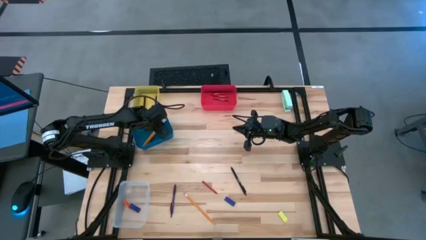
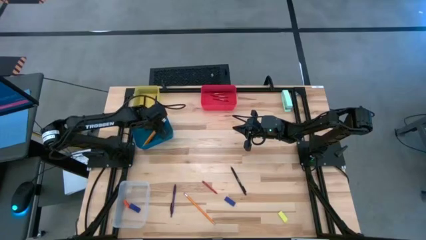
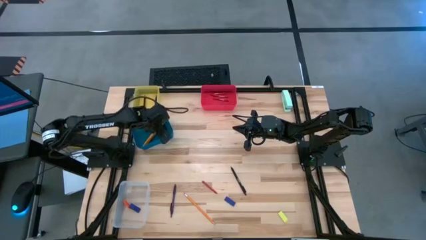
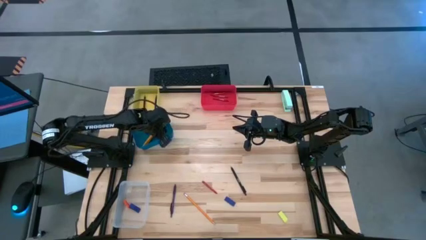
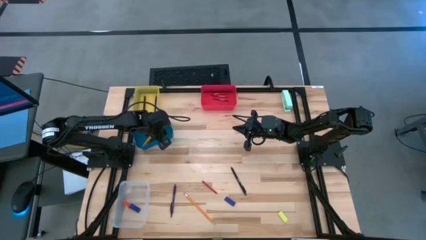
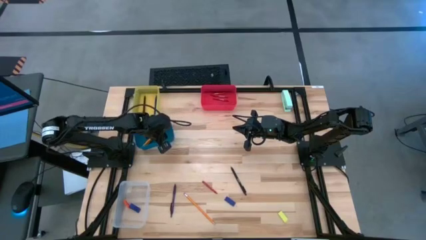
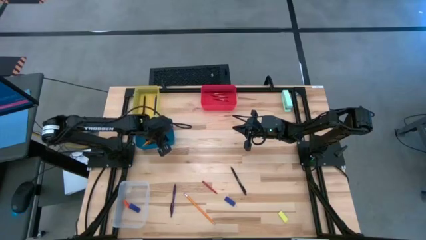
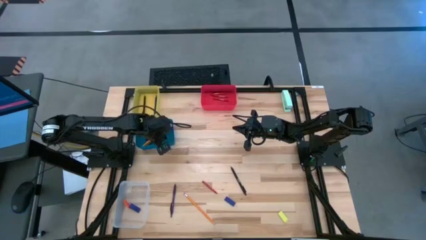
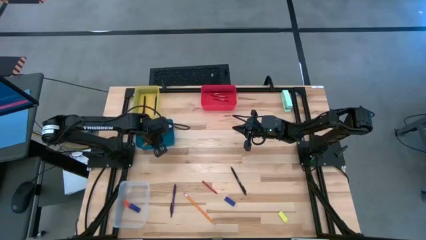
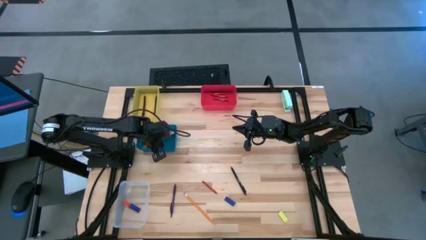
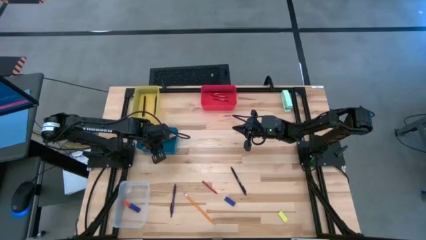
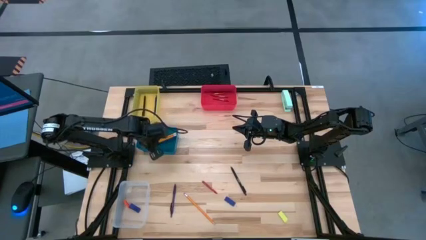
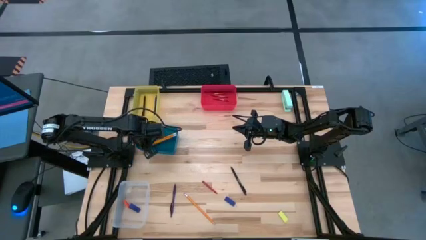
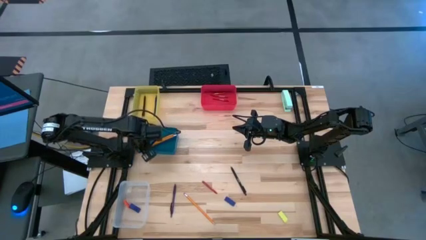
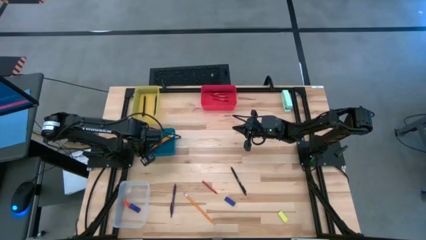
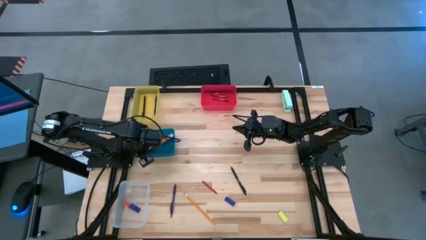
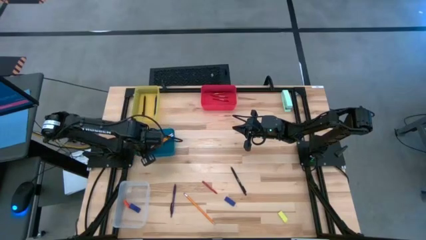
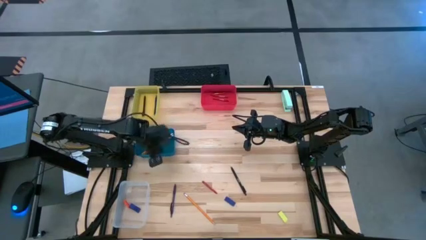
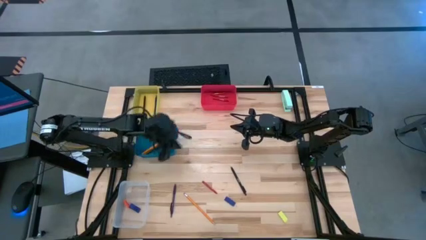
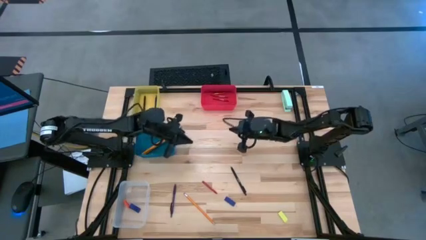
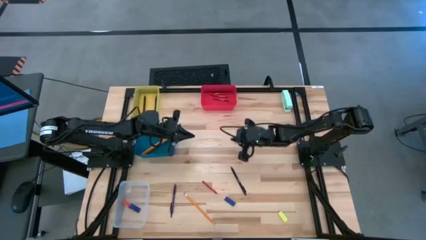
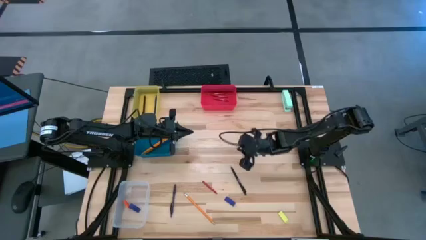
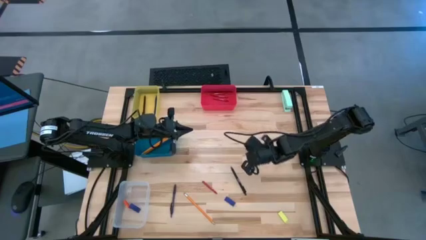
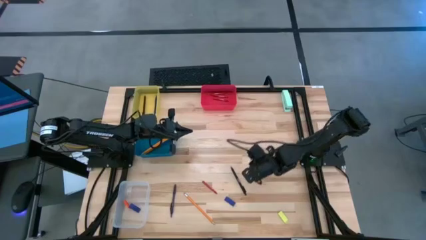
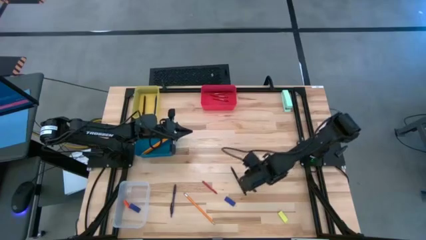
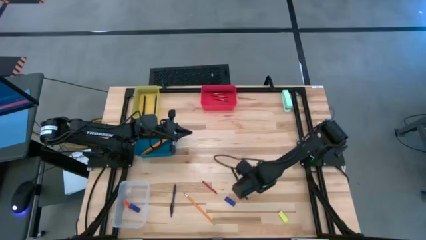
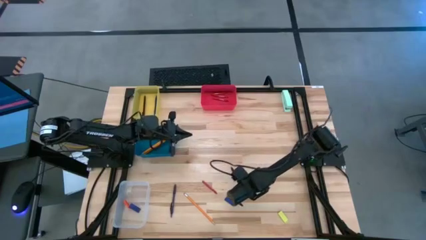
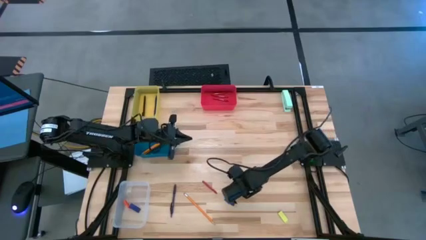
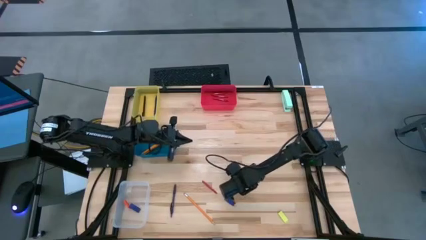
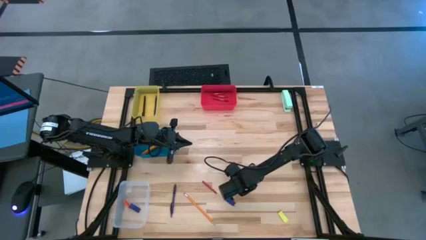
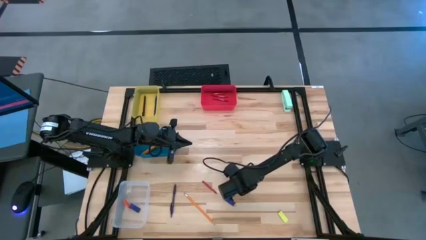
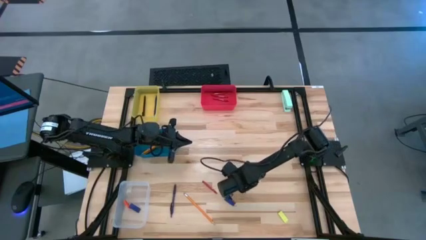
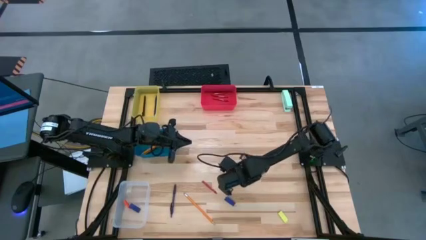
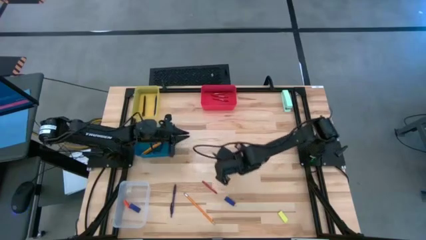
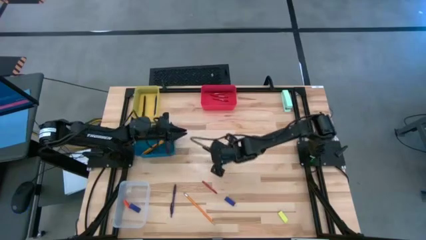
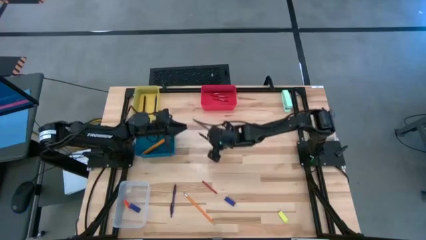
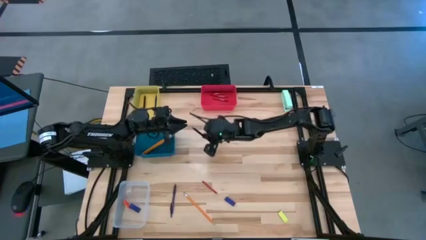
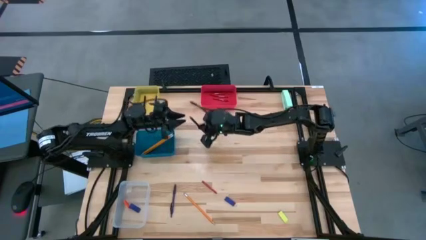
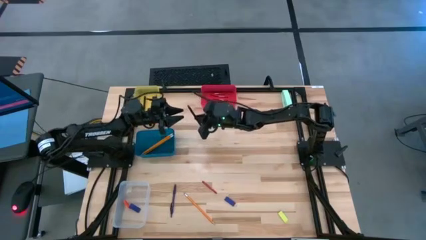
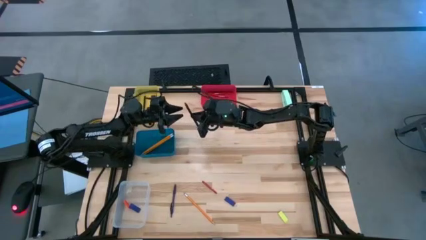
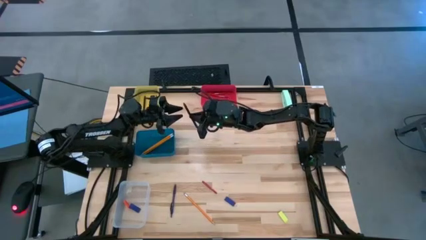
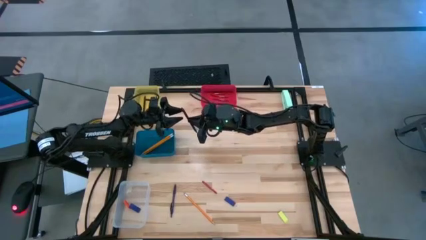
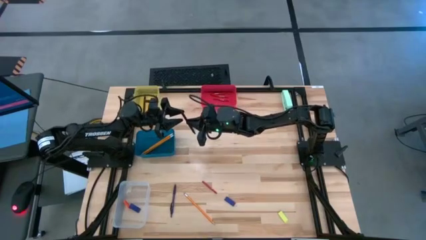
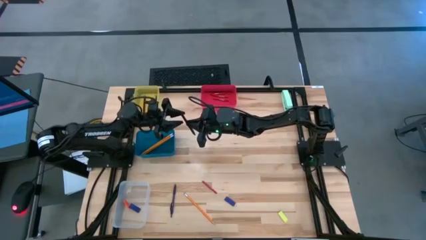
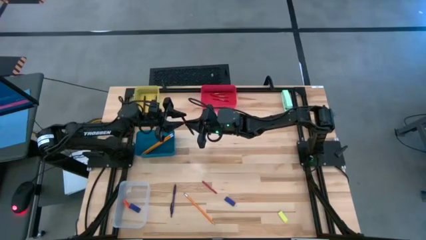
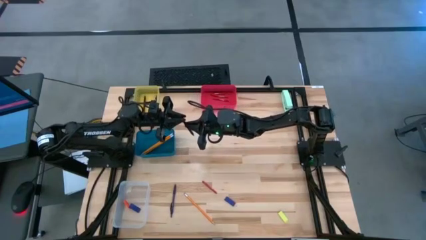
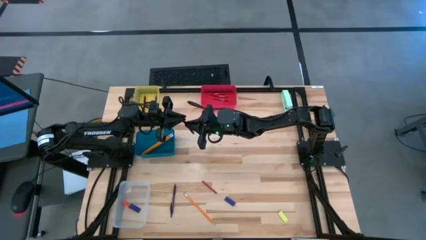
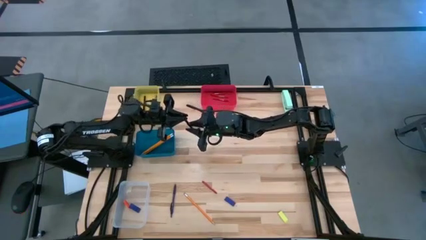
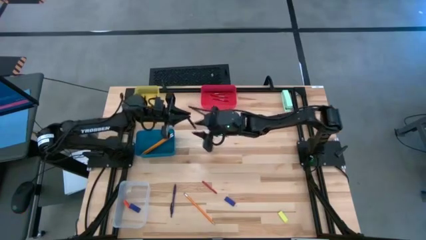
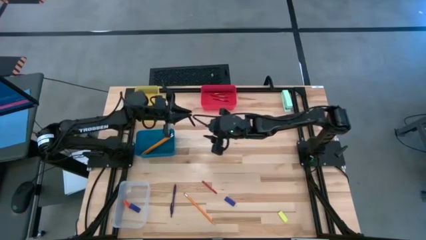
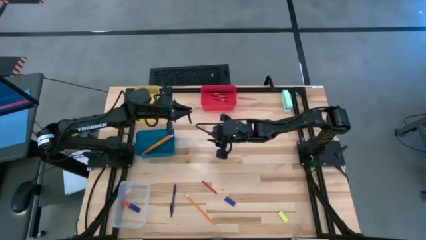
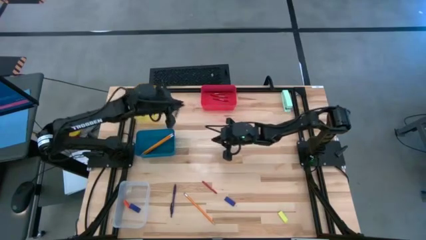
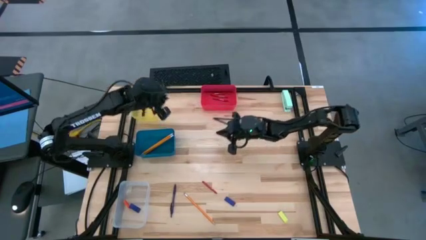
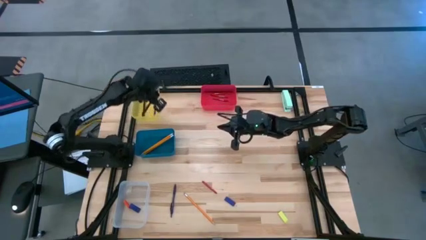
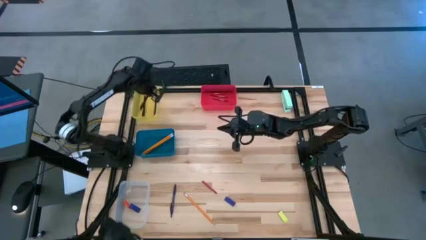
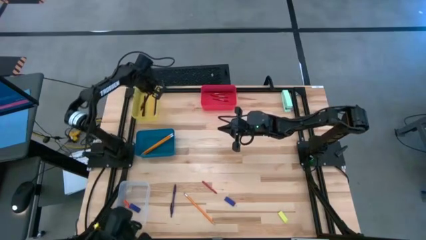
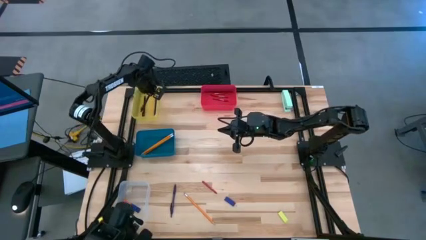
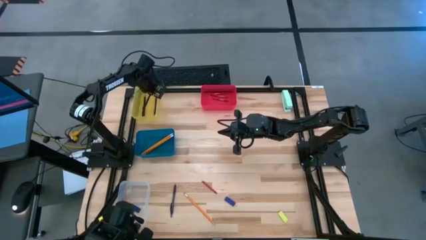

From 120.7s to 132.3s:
Task: Sort crayons/erasers/pens/pencils in bins
Put the black pen into the yellow bin

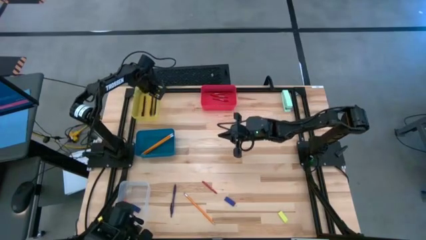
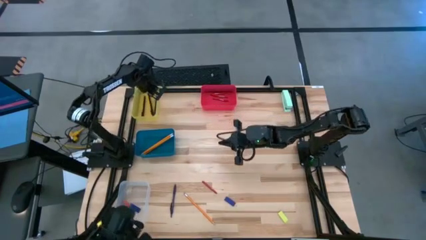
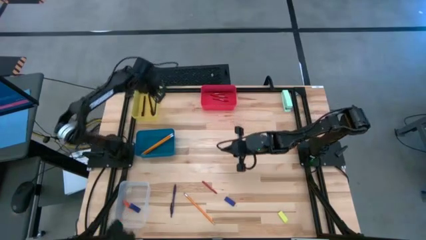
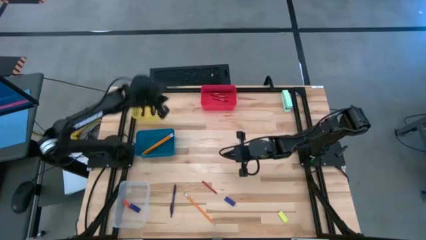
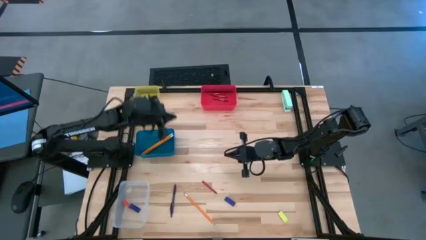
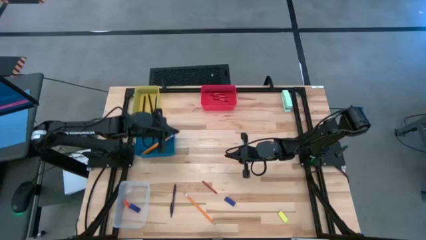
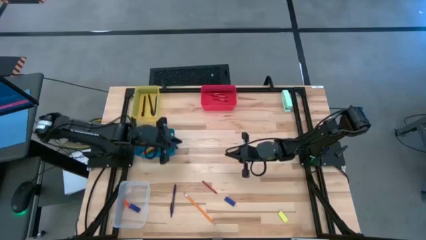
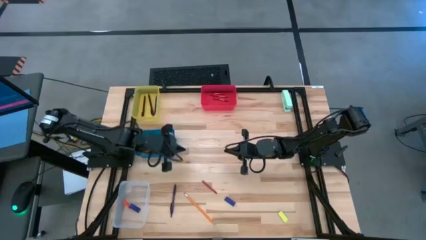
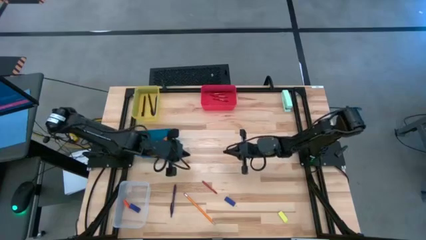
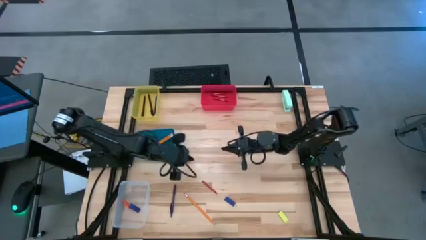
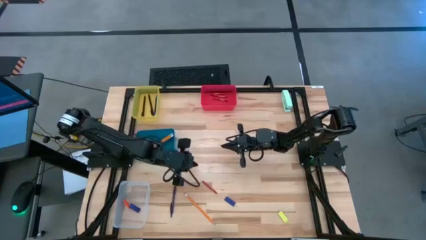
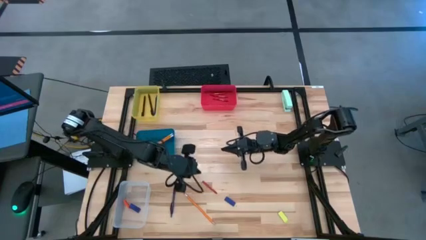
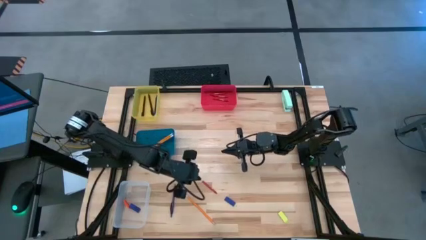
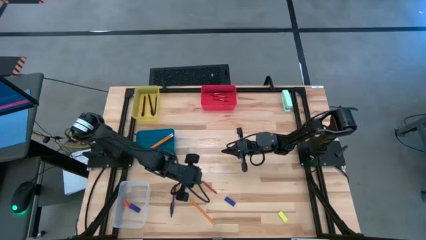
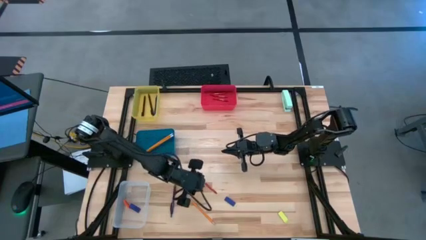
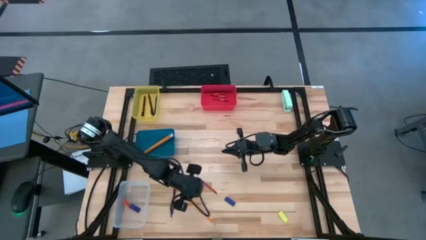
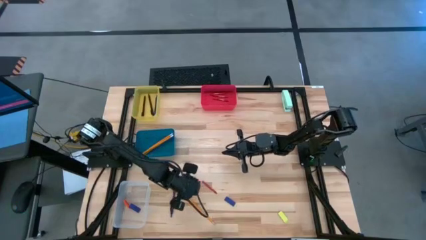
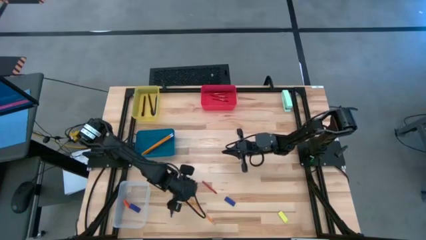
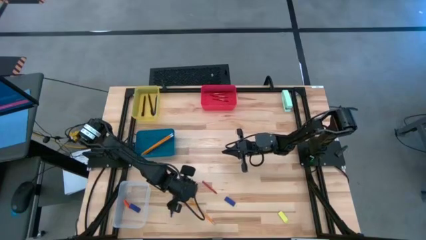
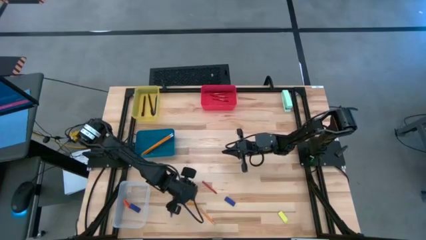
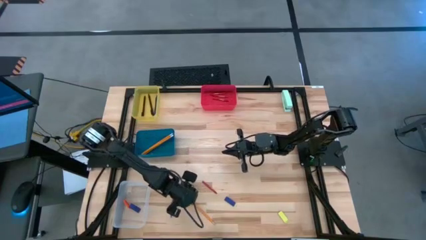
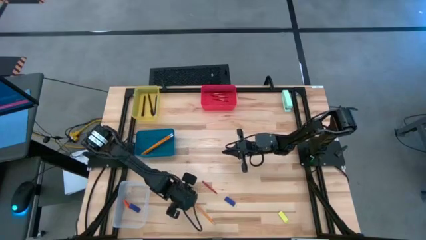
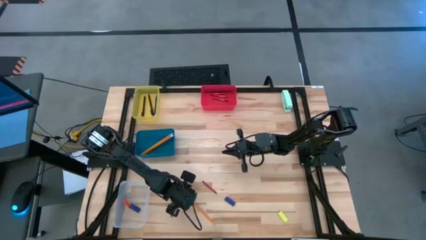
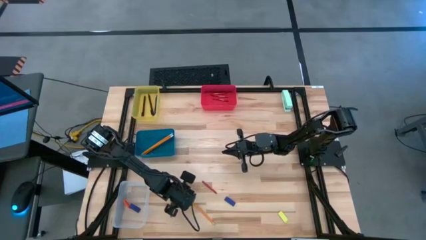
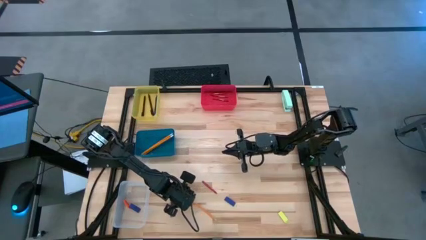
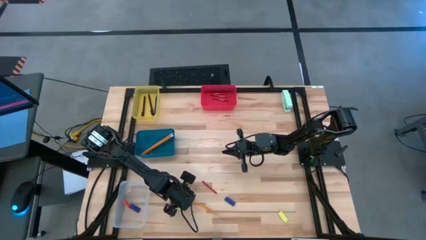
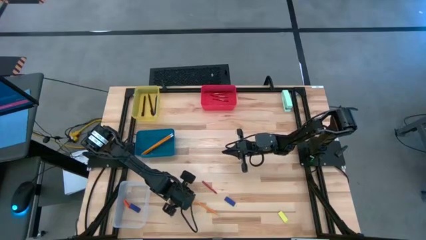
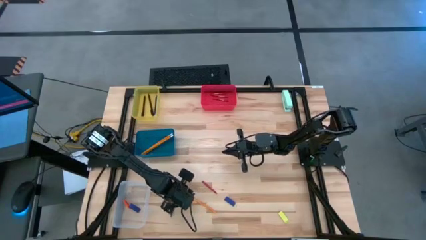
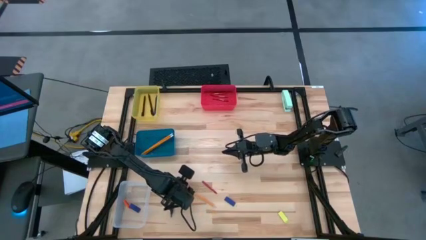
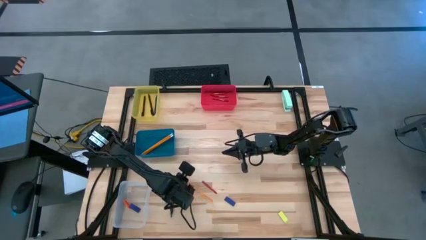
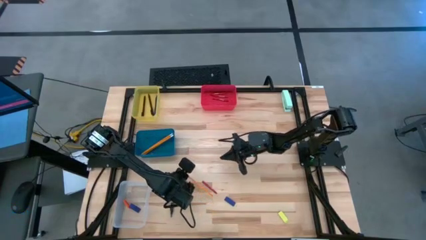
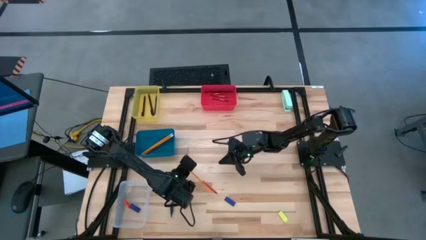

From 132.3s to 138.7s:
Put the yellow pencil into the blue bin
